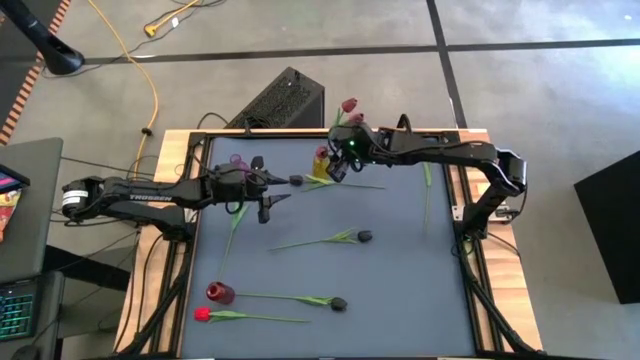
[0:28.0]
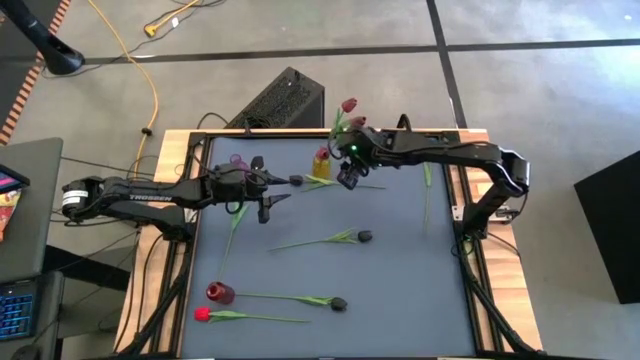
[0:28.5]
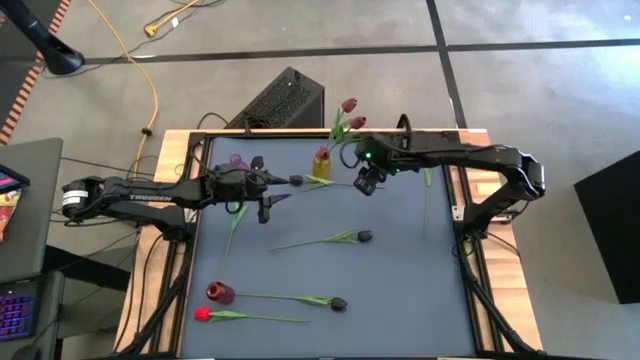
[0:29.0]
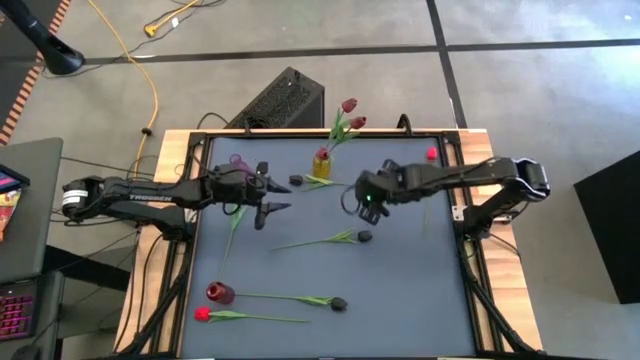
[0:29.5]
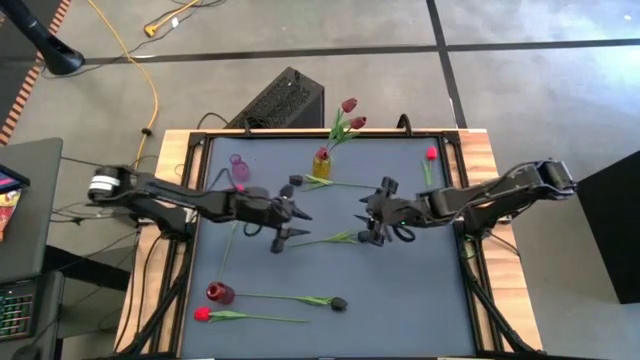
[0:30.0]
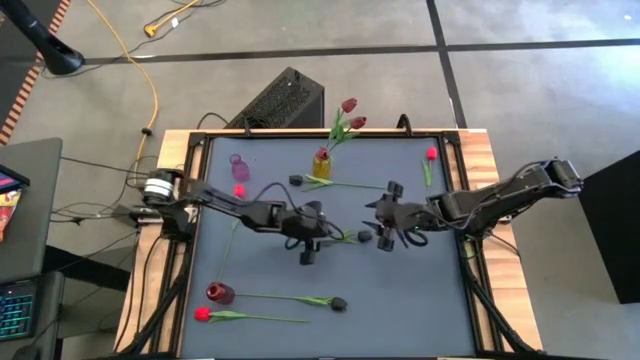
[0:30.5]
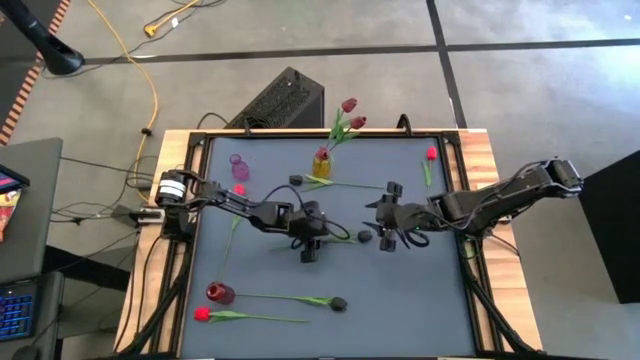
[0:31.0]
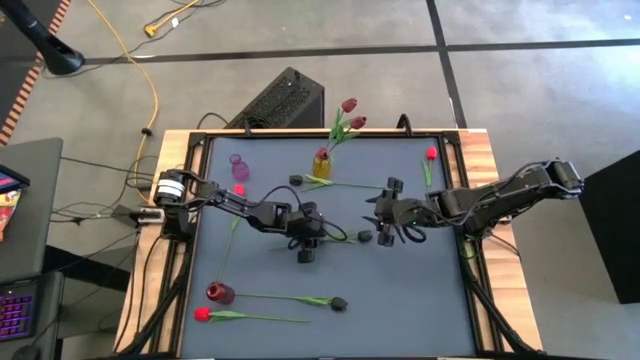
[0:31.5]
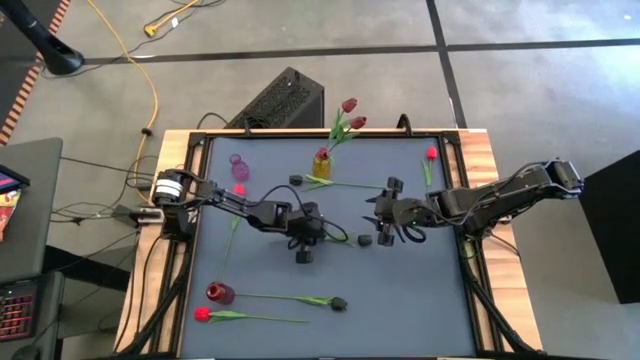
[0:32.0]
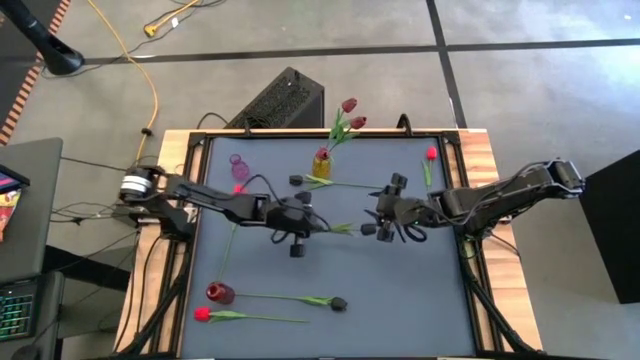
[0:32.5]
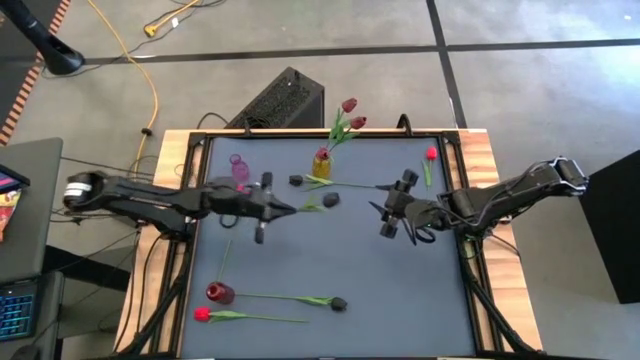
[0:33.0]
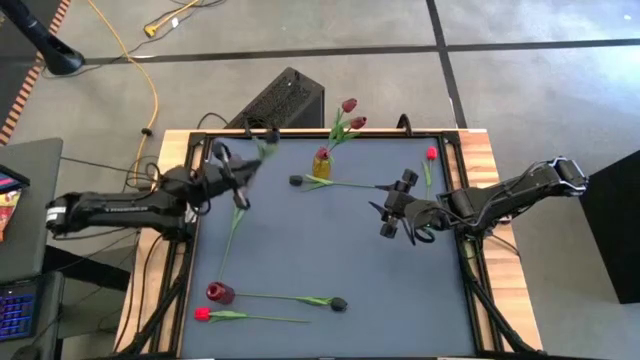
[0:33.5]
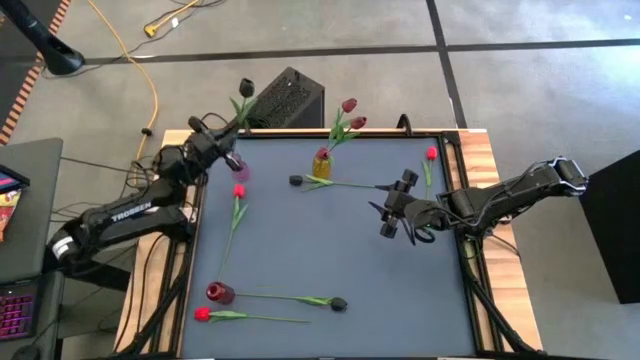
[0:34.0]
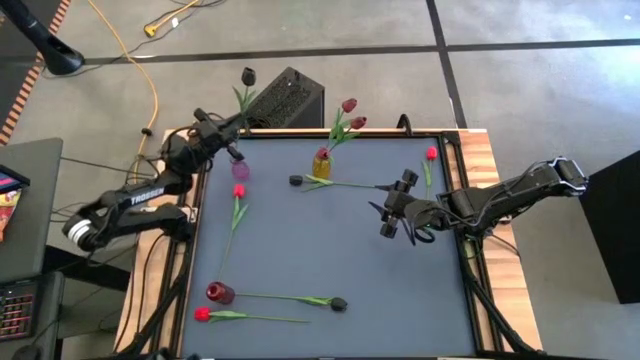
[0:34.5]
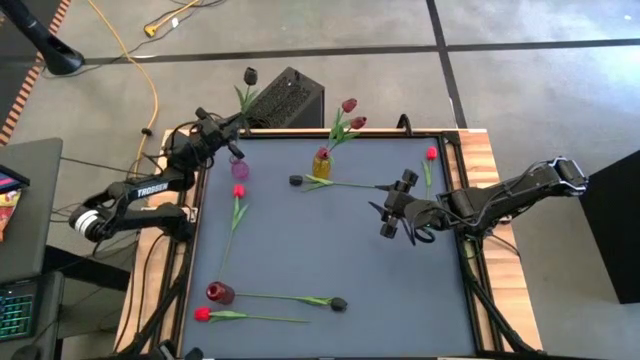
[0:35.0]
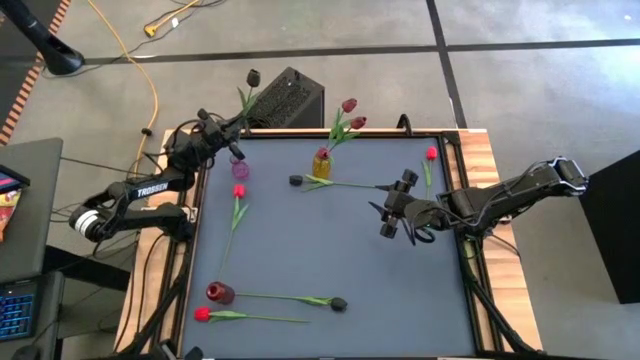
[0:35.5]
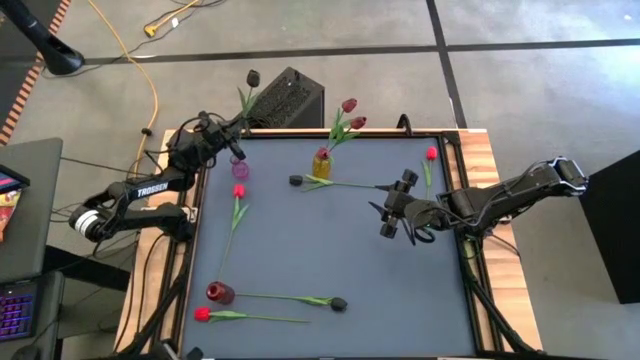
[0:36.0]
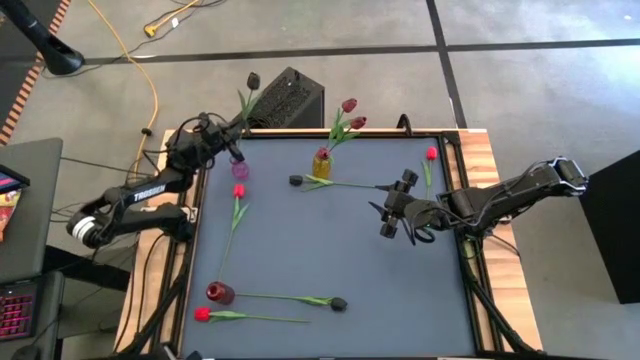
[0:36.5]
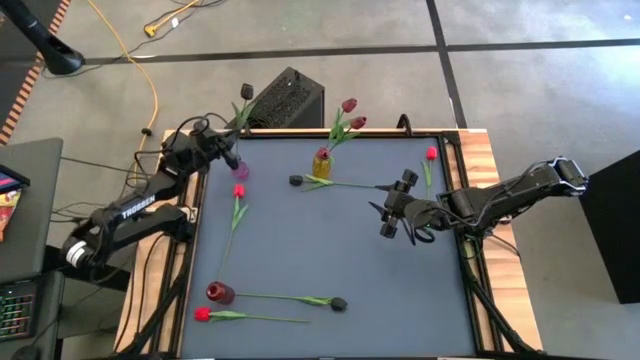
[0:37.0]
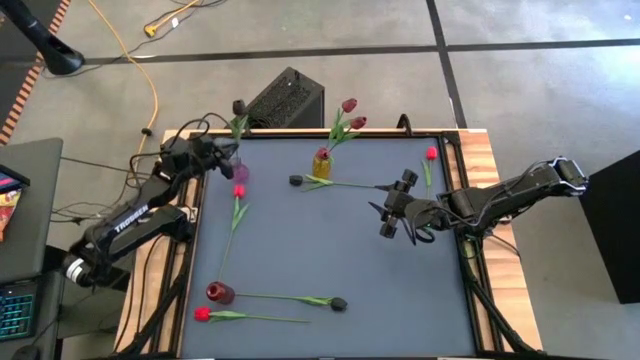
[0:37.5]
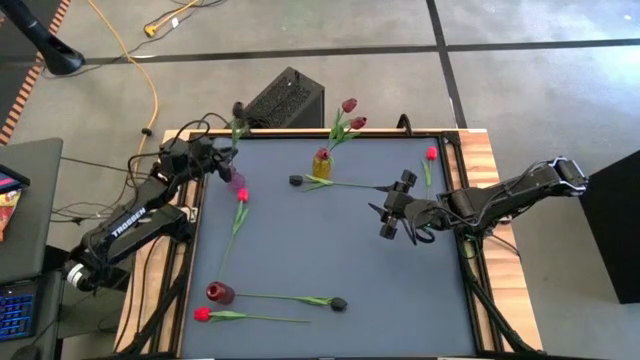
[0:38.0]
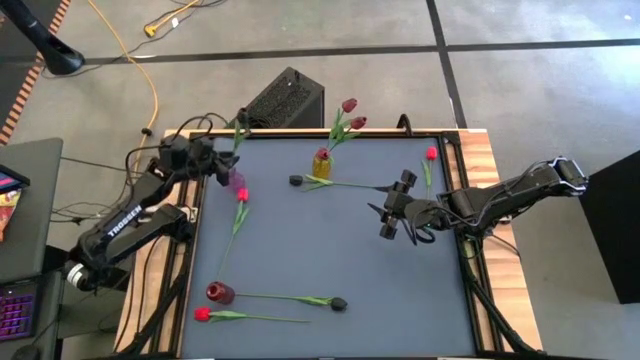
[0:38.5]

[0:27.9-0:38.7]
Task: Sort flowers into vase by color
Put the middle black flower into the purple vase

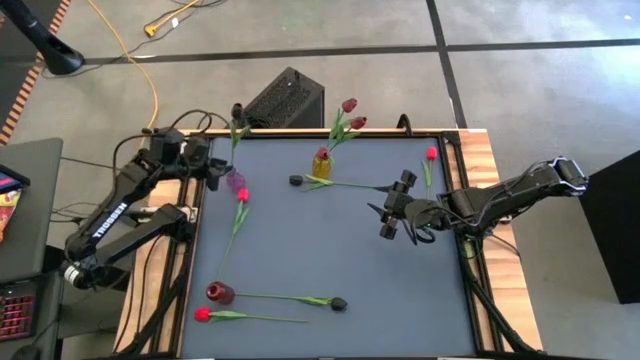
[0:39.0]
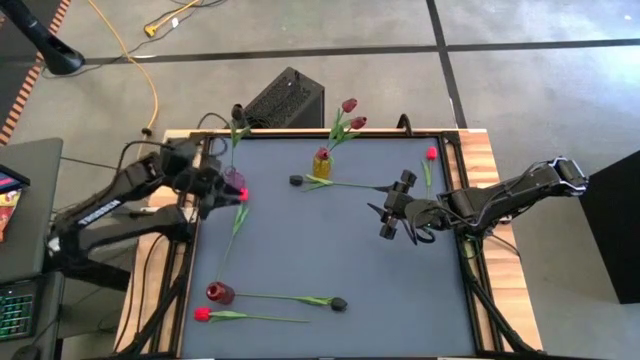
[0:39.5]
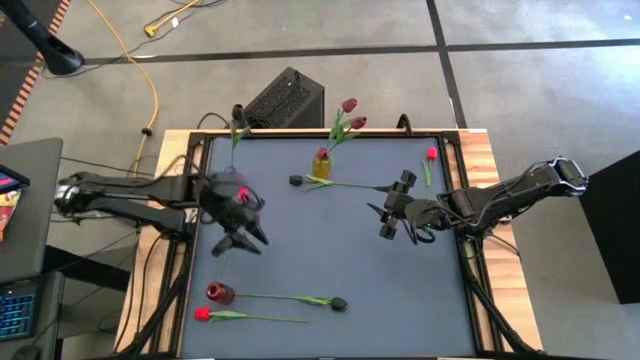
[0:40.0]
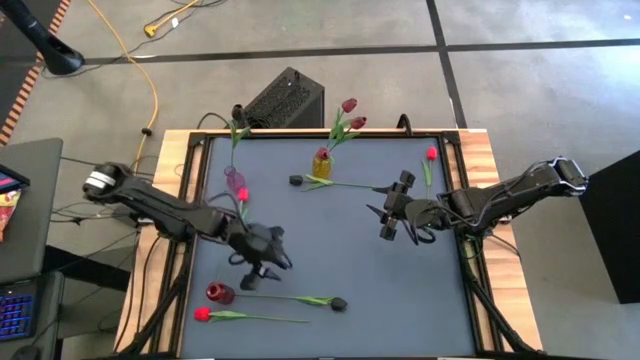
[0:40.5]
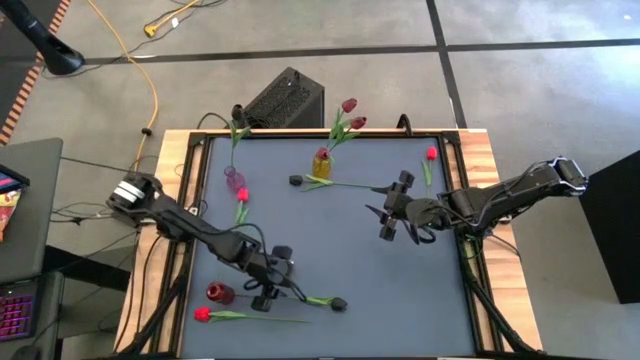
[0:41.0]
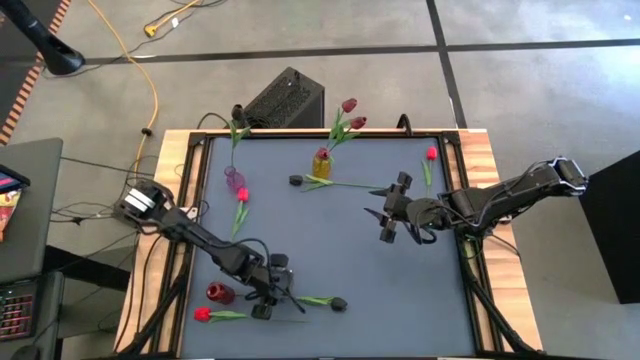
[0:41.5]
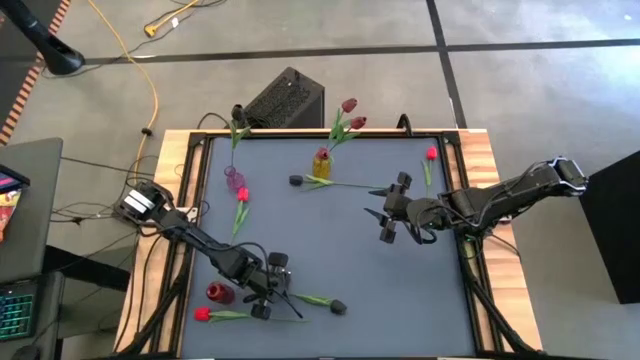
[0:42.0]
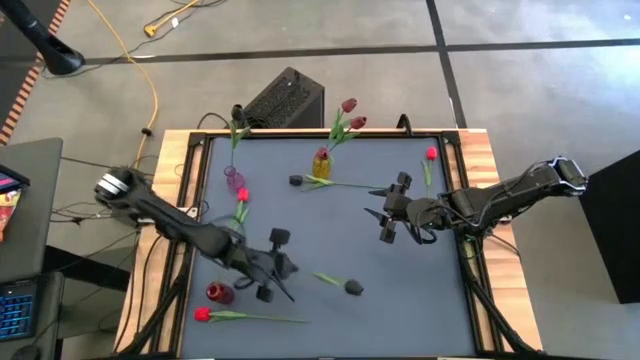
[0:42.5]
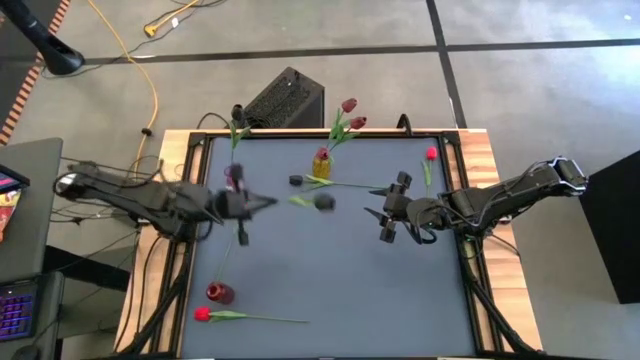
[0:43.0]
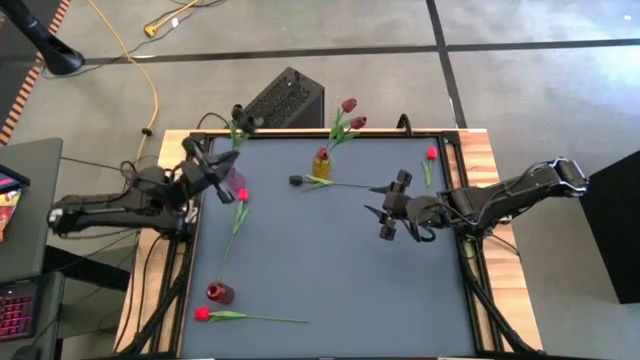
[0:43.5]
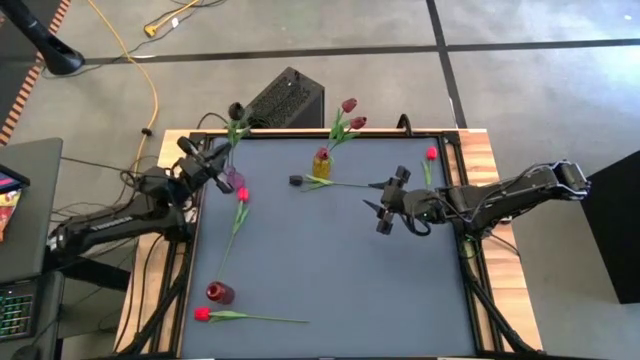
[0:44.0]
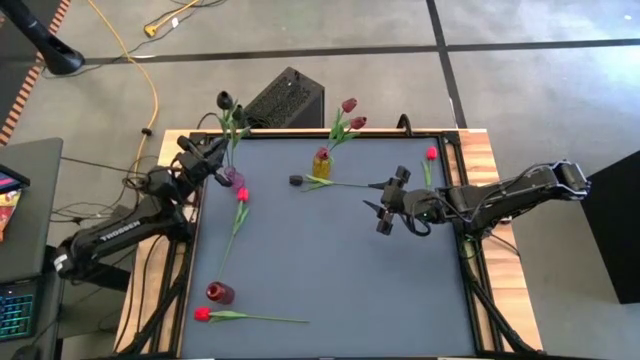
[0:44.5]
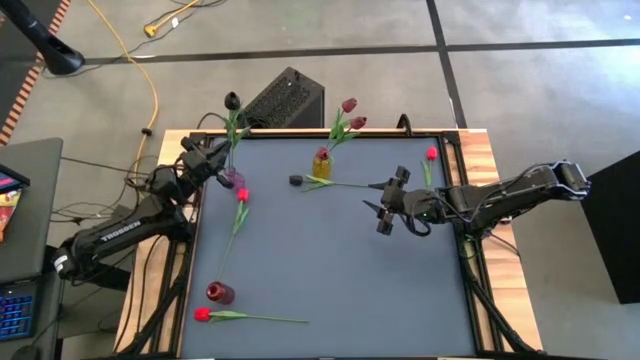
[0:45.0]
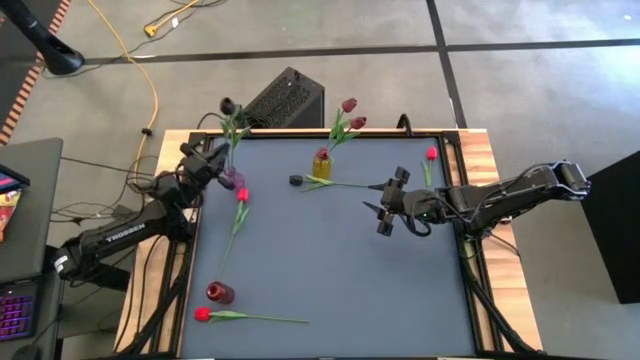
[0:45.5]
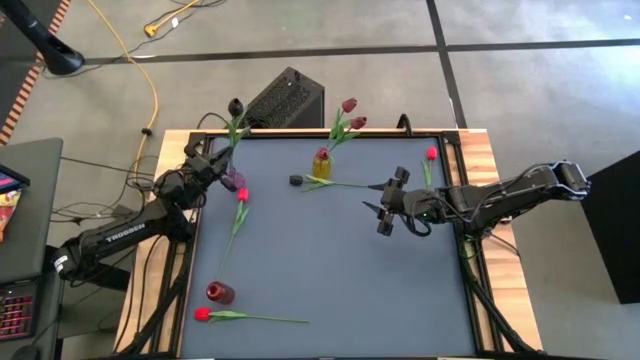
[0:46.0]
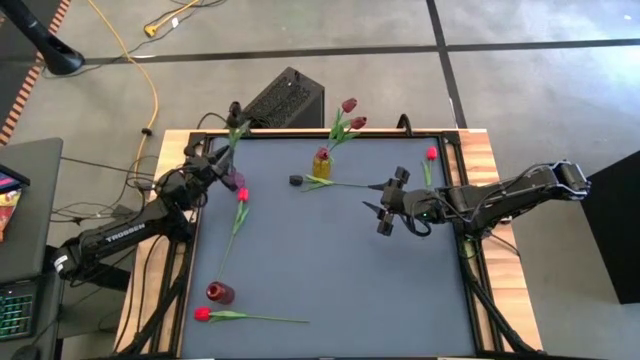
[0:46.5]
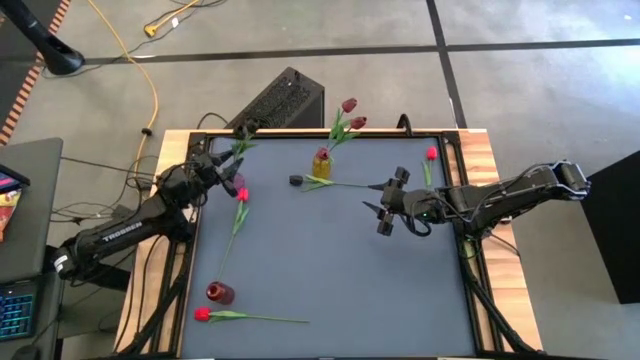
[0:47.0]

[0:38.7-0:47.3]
Put the bottom black flower into the purple vase

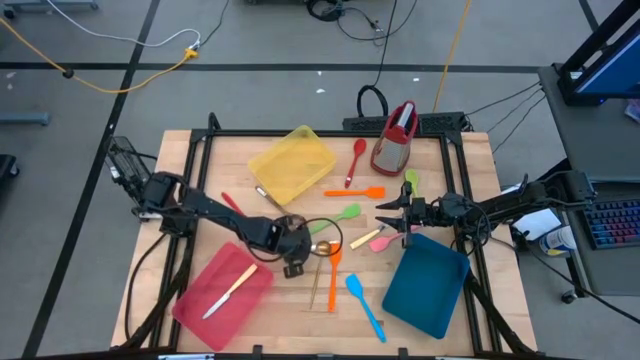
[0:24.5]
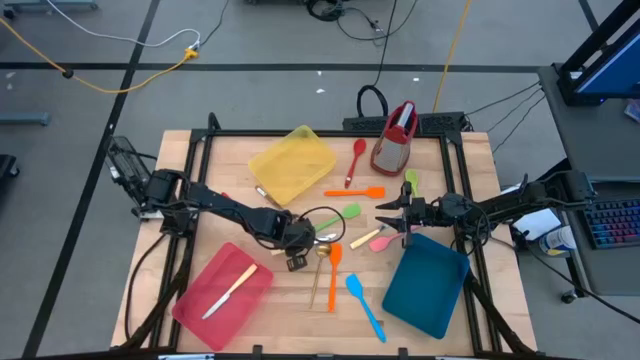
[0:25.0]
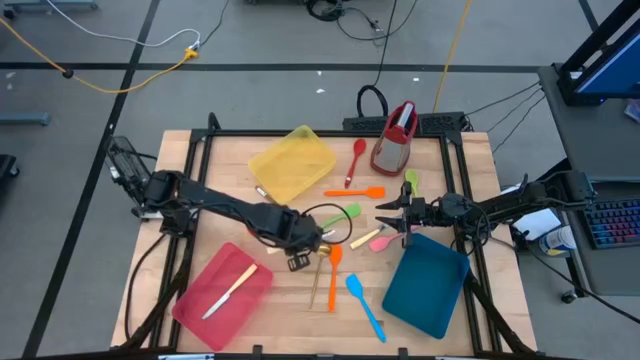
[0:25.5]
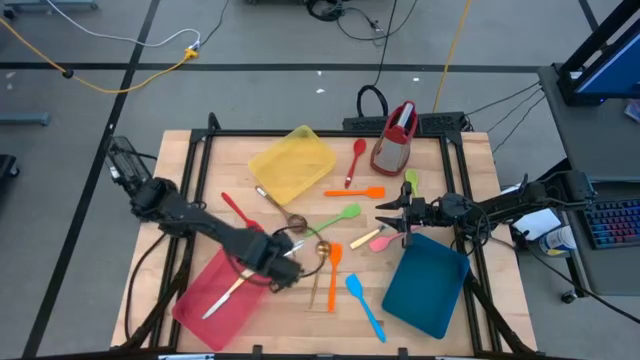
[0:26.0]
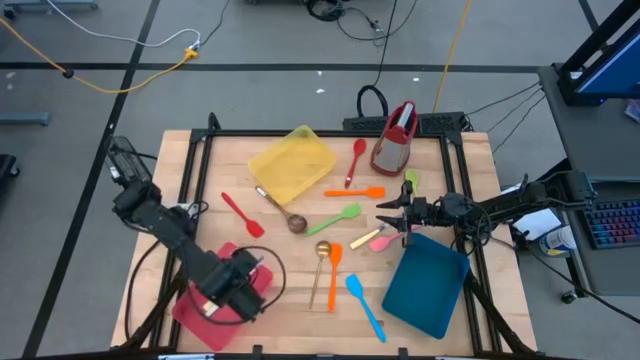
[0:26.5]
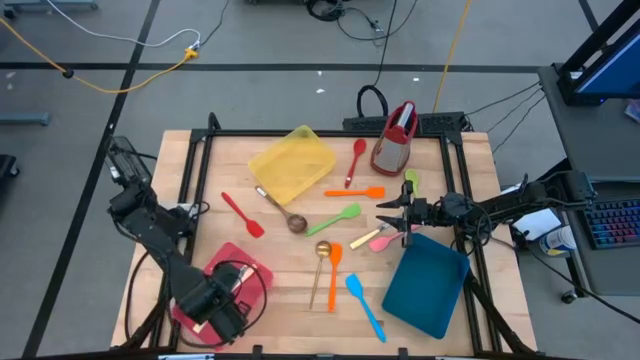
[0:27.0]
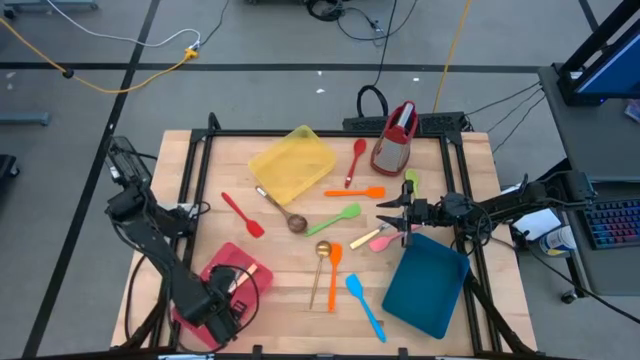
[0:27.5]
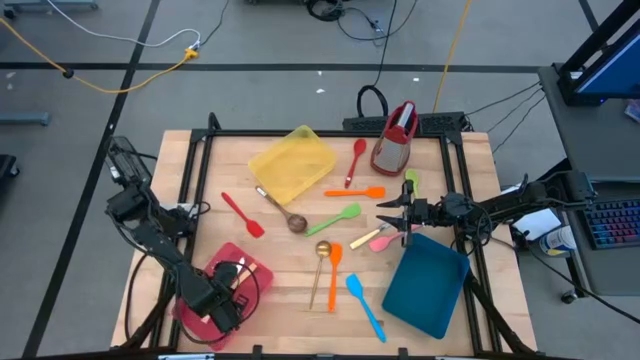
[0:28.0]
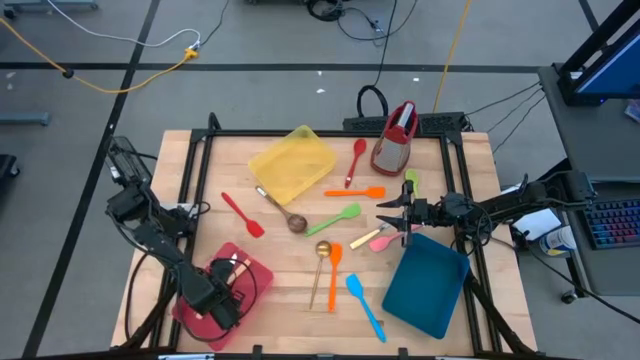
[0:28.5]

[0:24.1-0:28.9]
Task: Pick & Place Kitchen Items
Put the bottom yellow table knife into the pink bin
